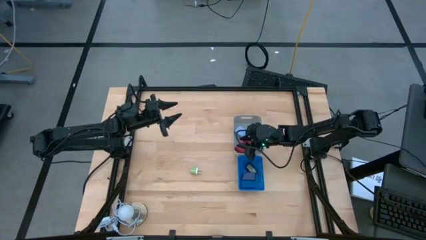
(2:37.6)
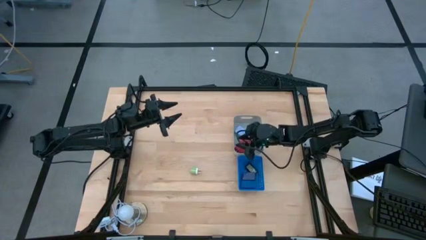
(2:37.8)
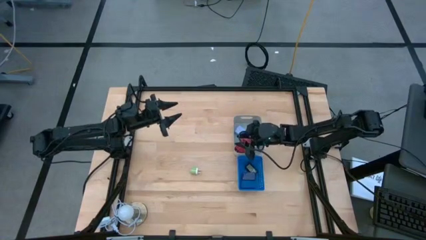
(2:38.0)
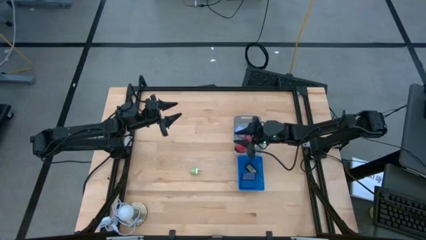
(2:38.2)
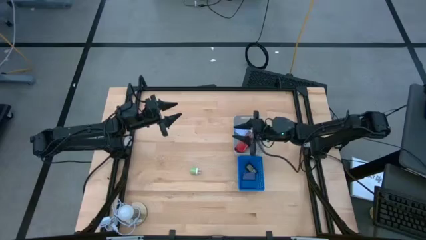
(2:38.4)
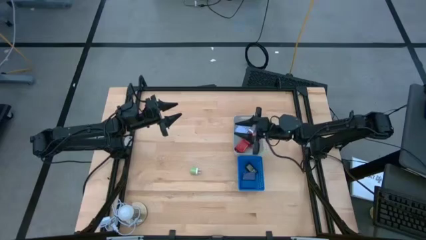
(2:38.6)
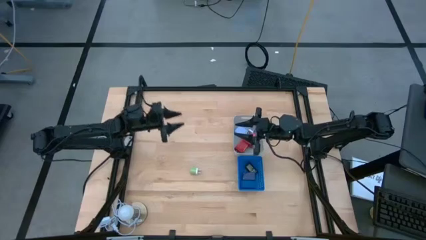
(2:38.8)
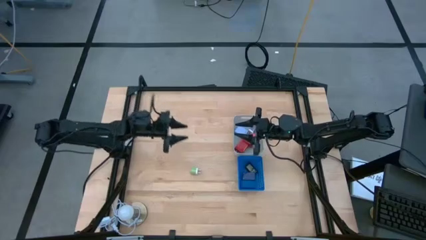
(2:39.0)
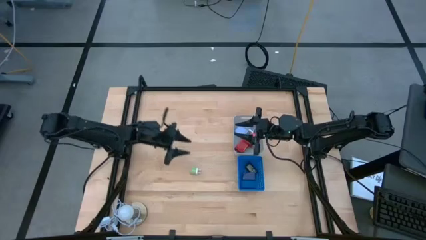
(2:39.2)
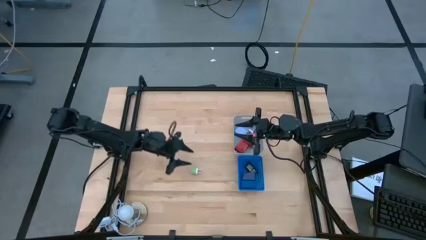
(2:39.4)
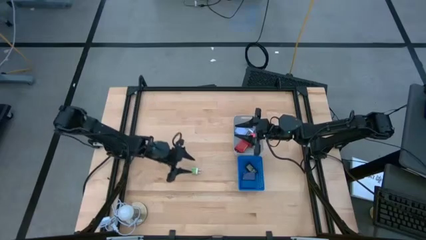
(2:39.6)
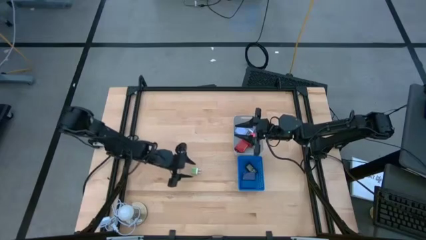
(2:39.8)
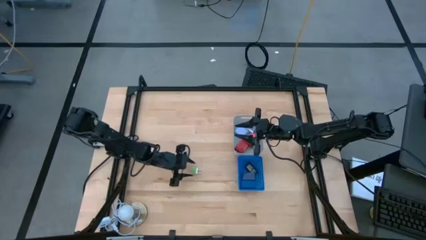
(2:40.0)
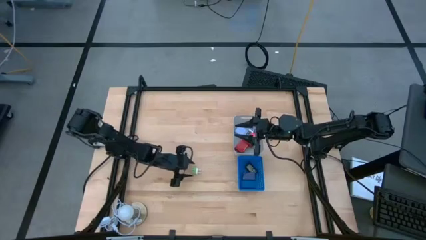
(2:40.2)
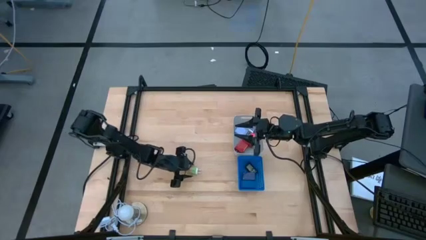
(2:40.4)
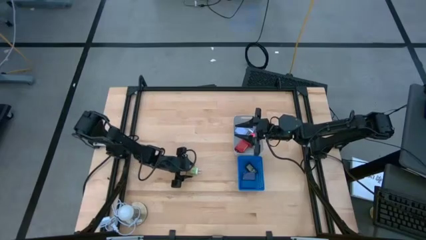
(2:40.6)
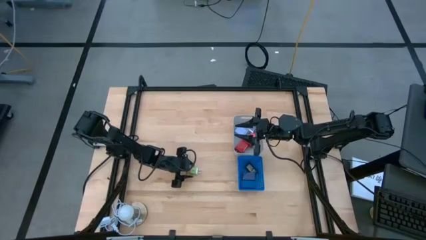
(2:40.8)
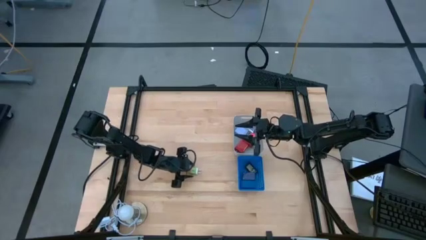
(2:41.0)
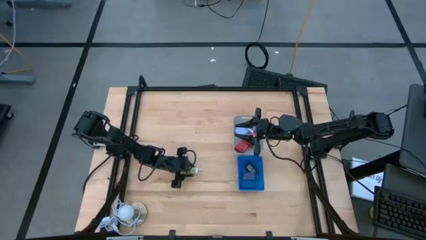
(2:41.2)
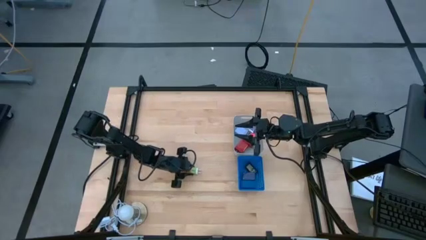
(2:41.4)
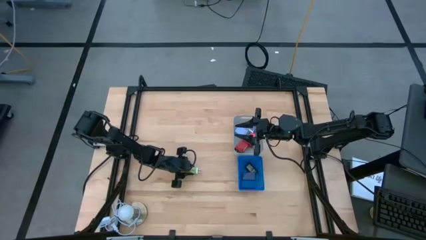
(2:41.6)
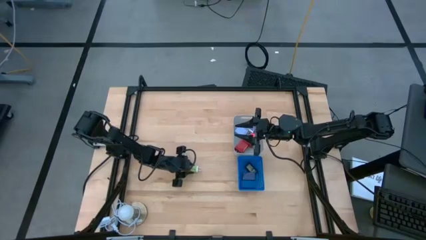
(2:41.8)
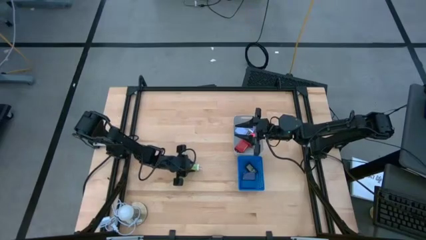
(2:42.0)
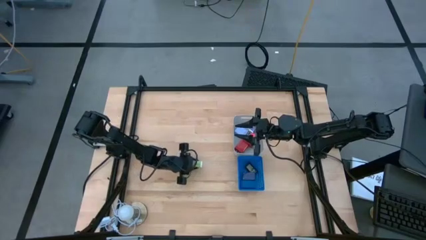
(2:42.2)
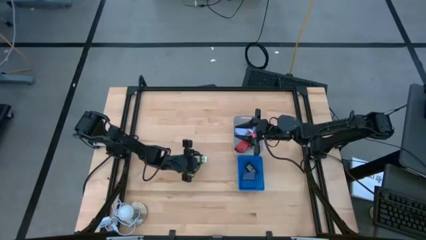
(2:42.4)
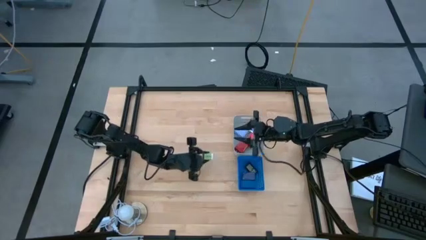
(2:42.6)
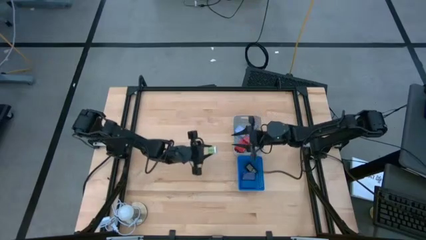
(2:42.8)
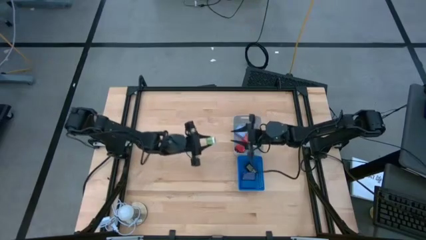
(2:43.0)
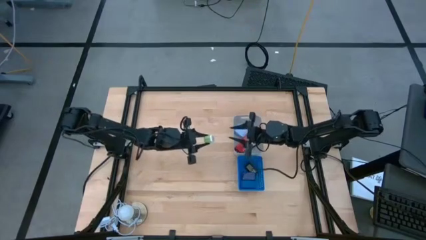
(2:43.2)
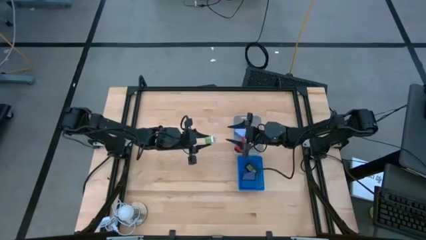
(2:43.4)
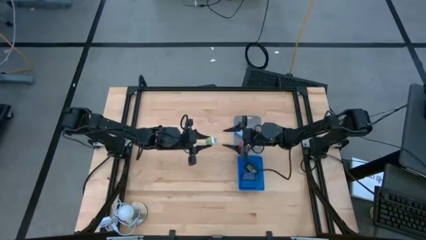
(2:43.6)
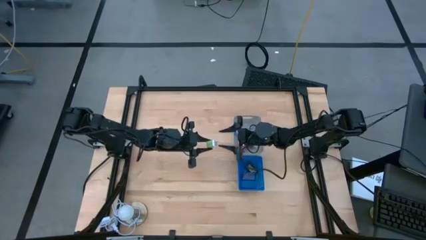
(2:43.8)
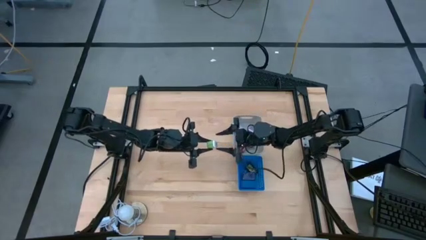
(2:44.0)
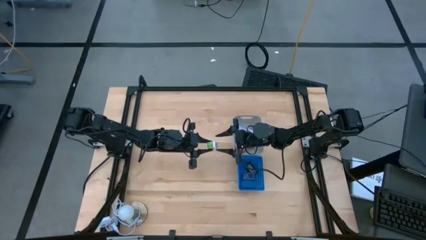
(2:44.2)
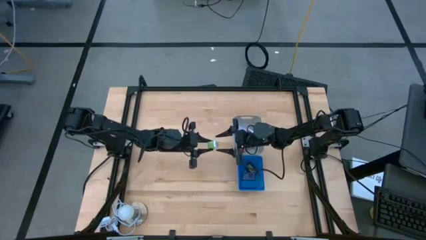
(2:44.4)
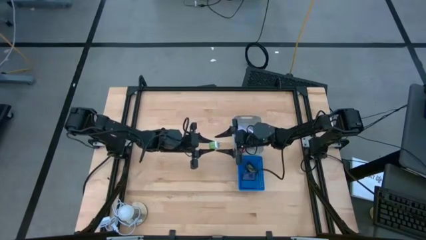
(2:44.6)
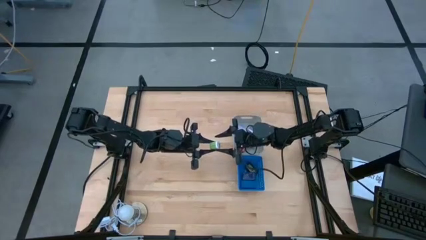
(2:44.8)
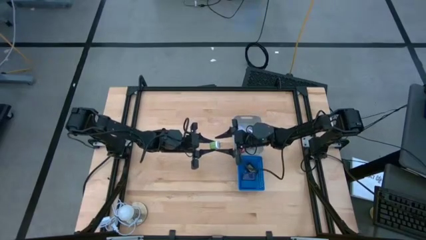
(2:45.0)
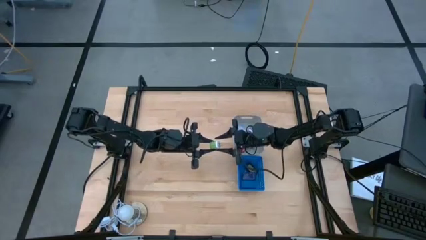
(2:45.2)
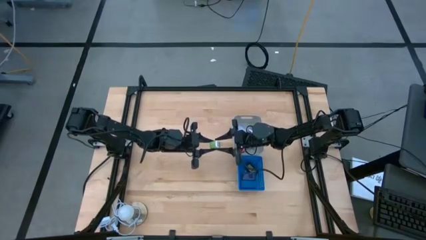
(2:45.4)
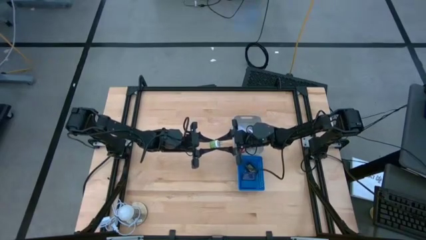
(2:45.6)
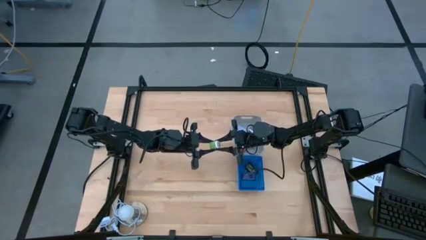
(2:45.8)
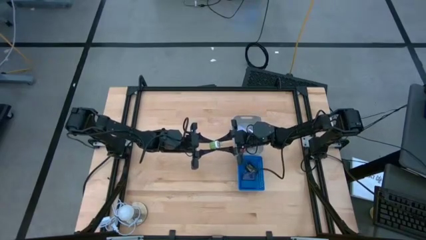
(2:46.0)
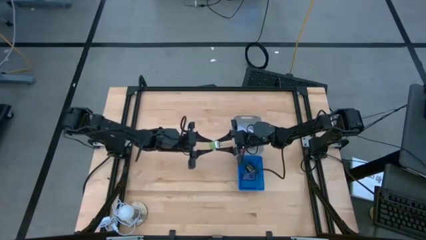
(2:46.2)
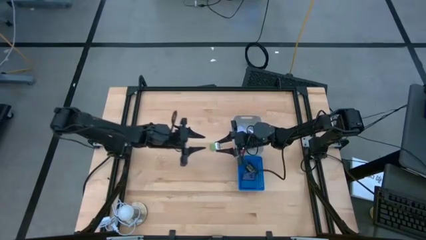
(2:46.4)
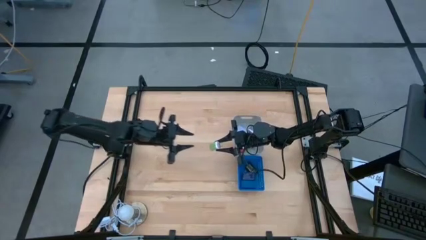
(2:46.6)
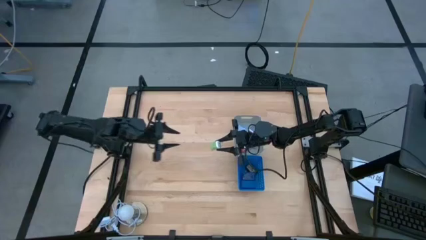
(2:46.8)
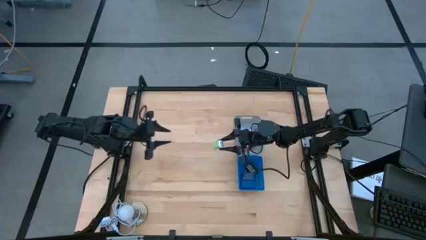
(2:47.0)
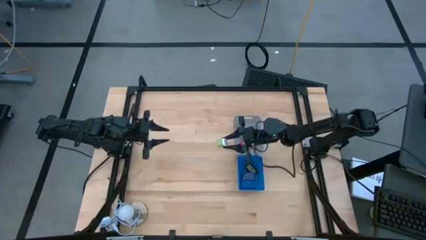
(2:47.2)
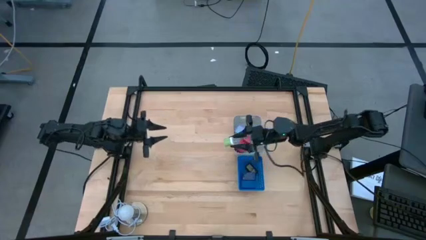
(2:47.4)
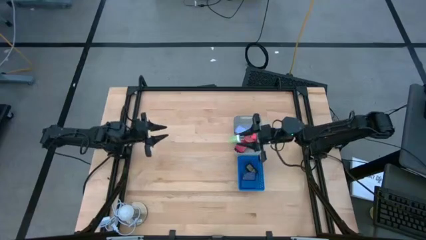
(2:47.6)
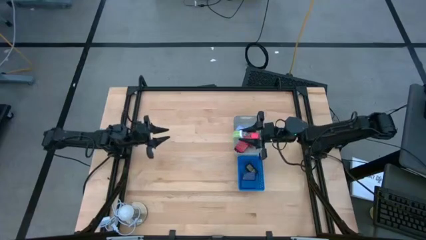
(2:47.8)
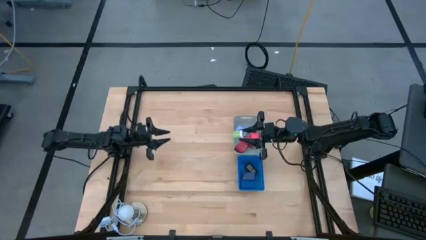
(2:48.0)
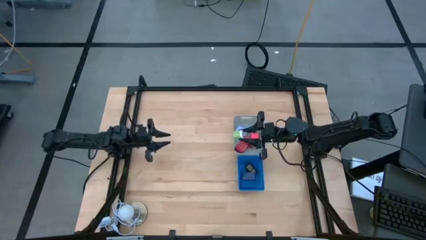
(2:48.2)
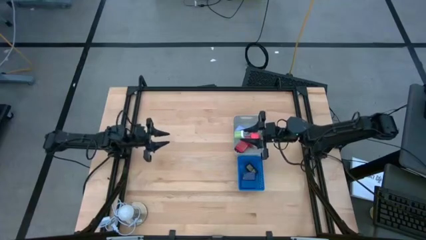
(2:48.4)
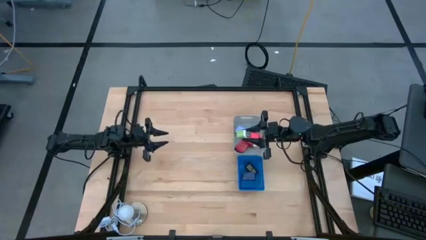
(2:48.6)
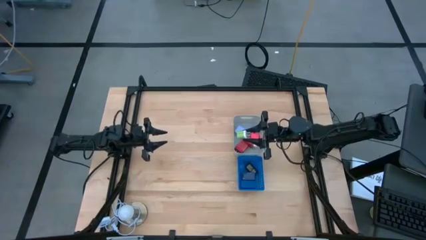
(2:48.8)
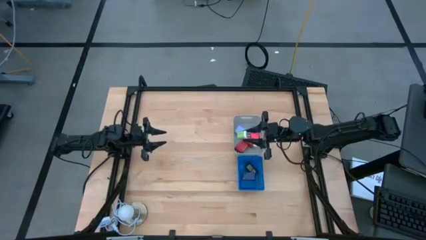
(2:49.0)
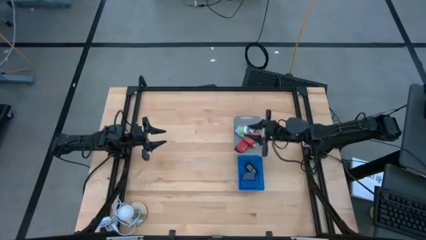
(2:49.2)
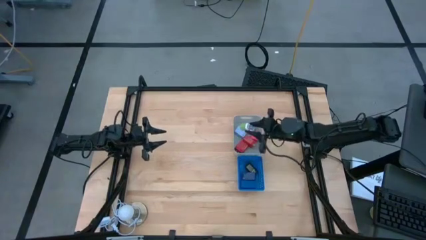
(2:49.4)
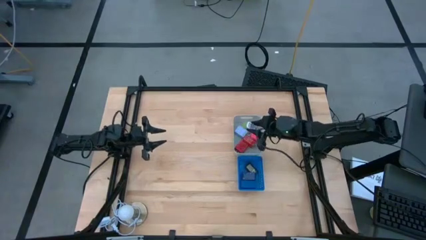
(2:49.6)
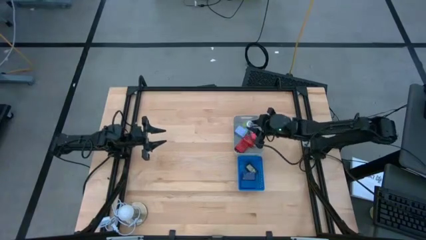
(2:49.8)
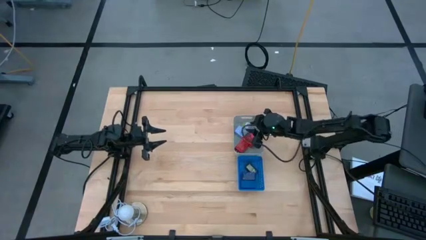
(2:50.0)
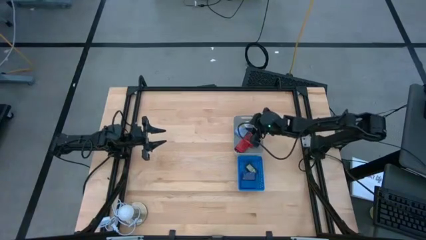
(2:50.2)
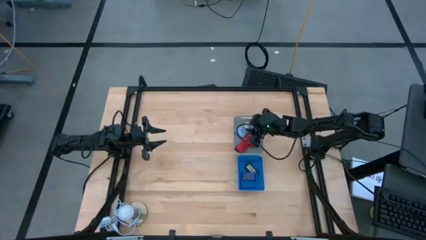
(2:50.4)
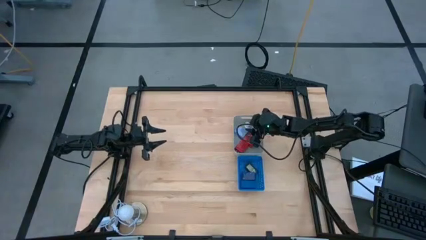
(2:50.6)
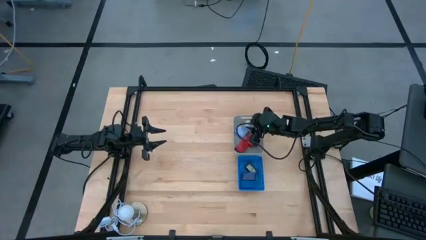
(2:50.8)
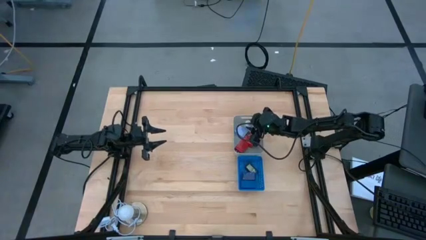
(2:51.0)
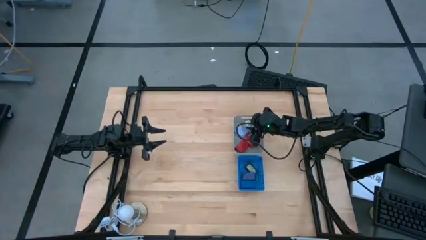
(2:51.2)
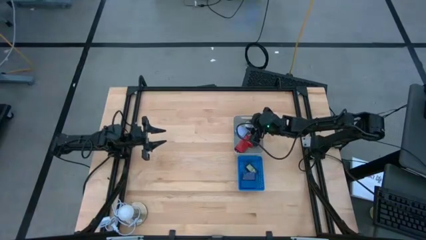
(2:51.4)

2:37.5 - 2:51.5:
Task: Pick & Place Office items
Put the green charger adapter into the gray bin

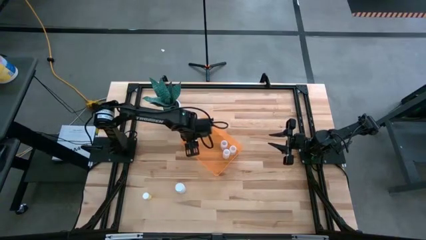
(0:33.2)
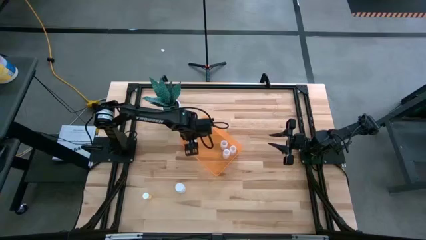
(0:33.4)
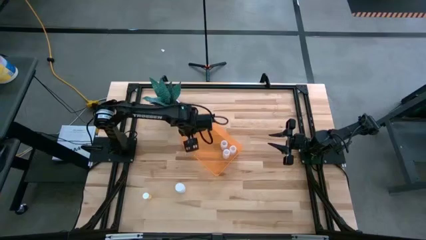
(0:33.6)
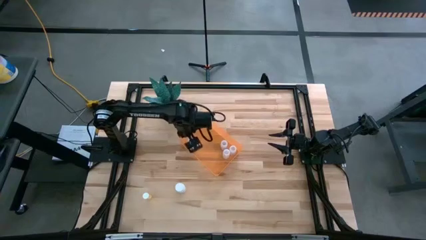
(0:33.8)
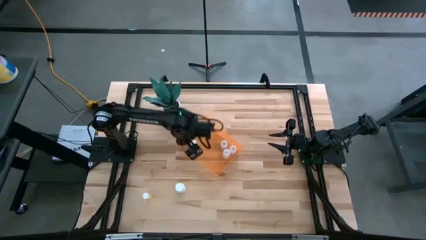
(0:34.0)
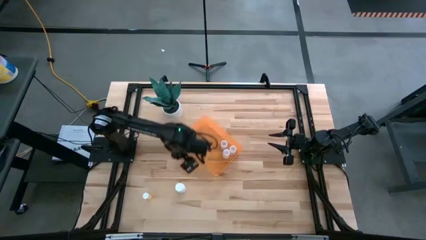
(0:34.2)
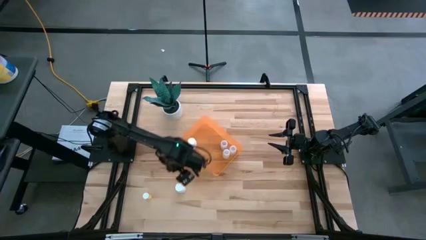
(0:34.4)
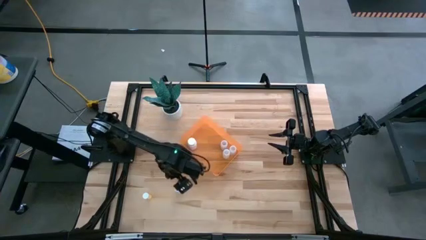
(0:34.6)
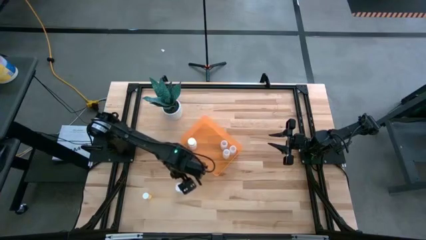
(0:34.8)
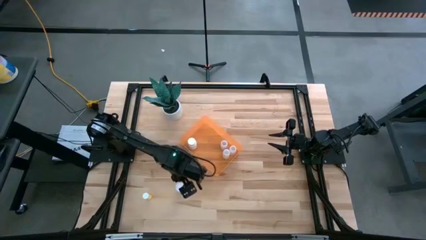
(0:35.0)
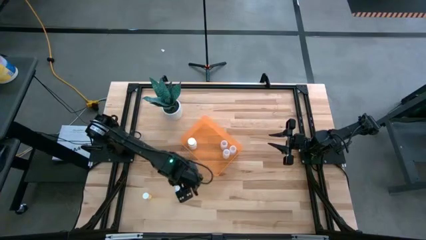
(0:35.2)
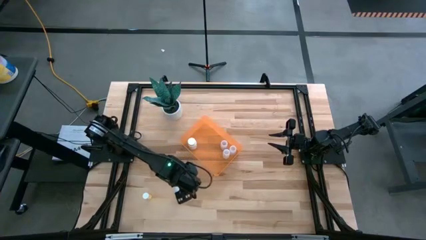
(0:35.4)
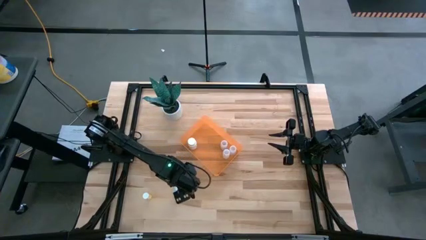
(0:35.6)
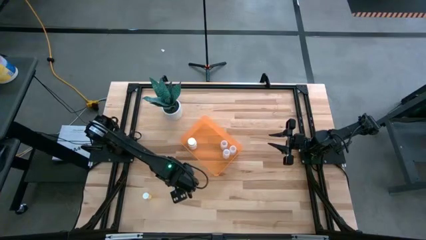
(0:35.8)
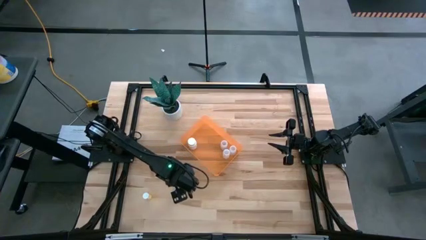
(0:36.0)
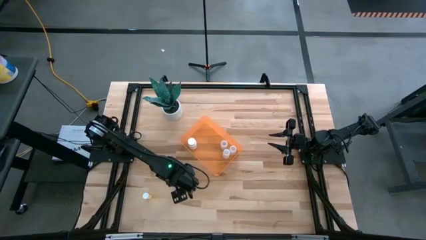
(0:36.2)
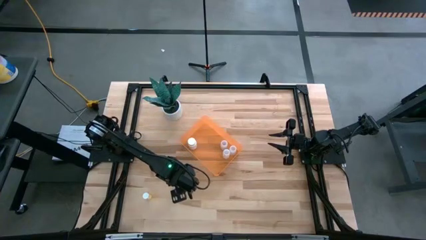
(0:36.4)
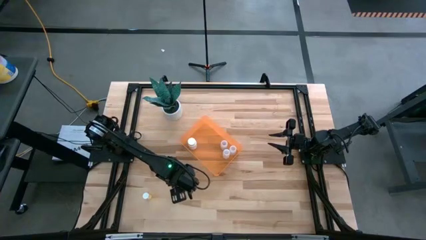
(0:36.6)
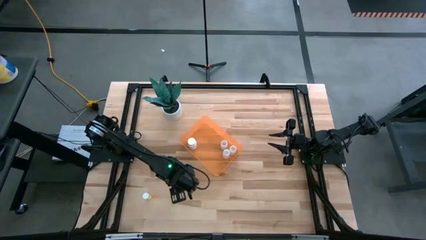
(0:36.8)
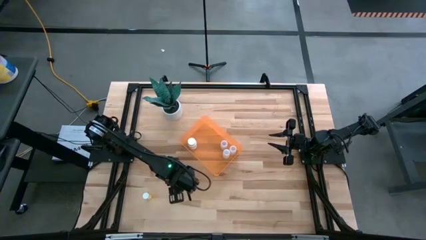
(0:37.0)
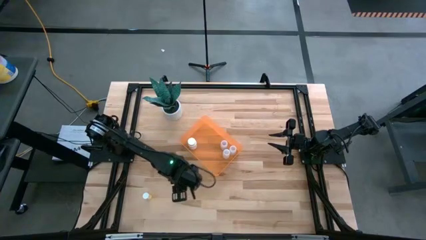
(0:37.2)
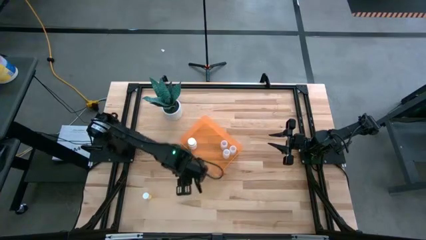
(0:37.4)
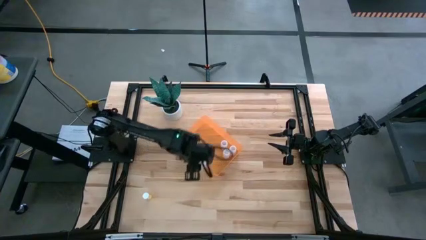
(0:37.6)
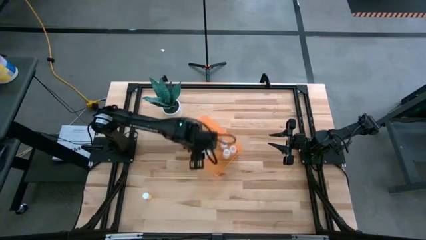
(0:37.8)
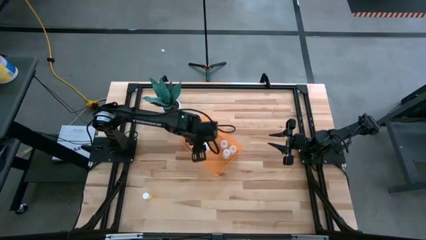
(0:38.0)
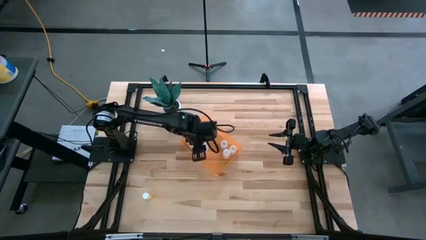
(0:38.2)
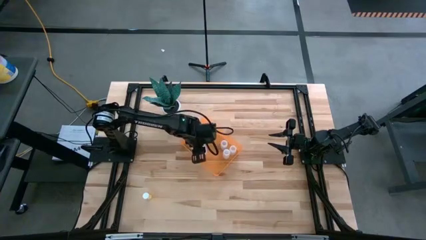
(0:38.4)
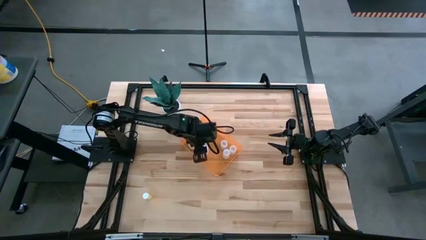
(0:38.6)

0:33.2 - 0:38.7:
Task: Pick and place pill bottles into a basket
Put the white pill bottle into the transparent orange bin
